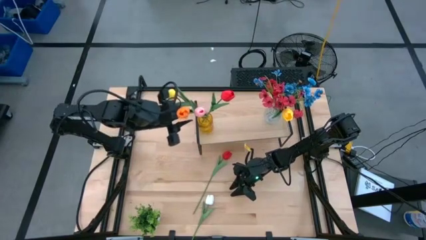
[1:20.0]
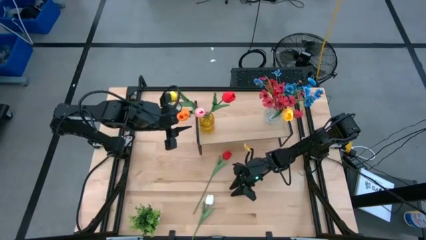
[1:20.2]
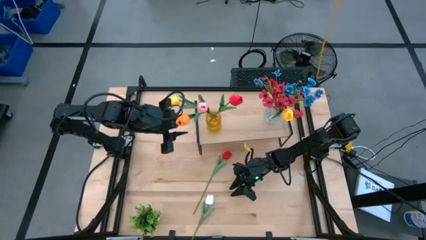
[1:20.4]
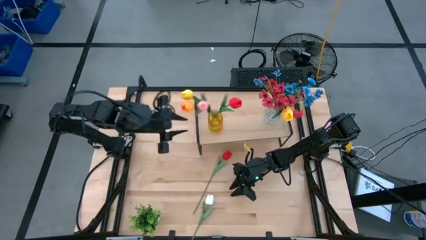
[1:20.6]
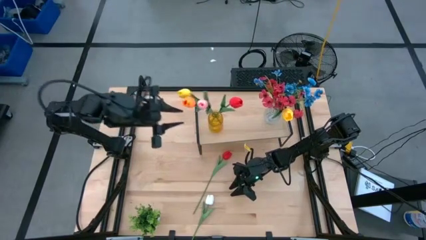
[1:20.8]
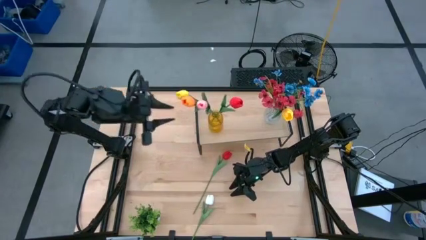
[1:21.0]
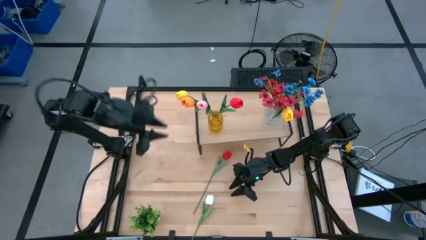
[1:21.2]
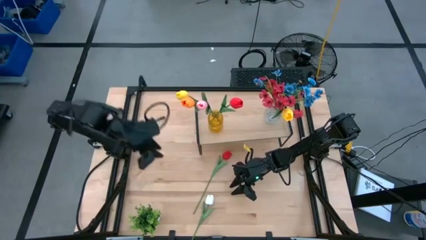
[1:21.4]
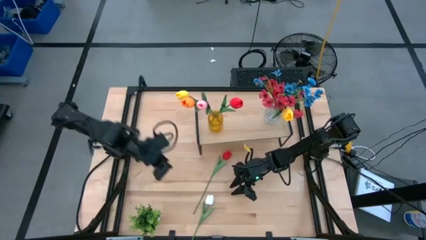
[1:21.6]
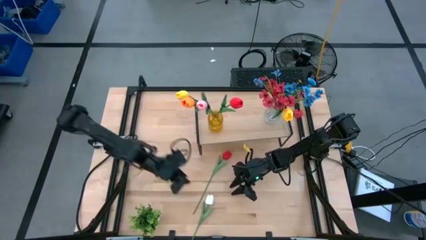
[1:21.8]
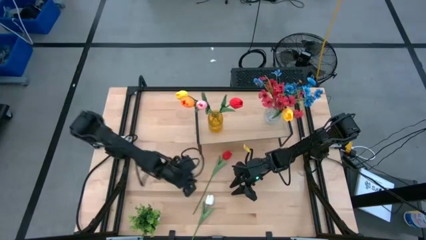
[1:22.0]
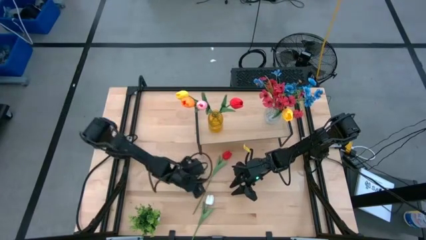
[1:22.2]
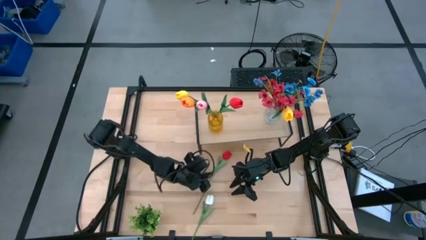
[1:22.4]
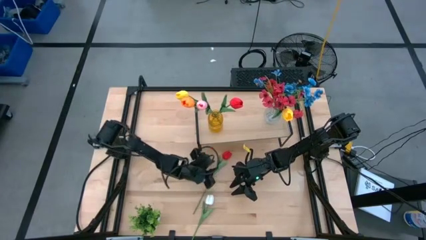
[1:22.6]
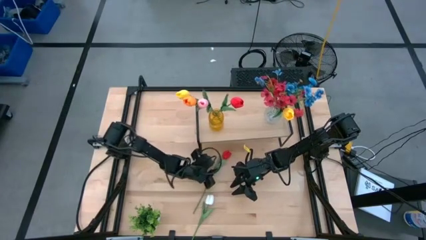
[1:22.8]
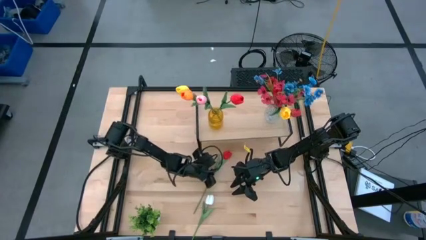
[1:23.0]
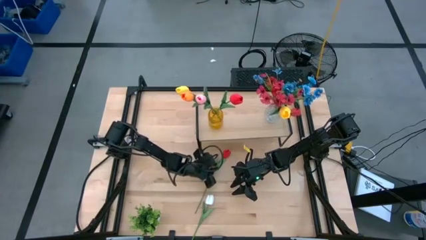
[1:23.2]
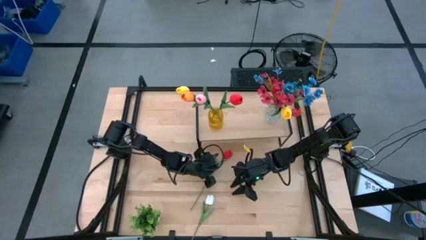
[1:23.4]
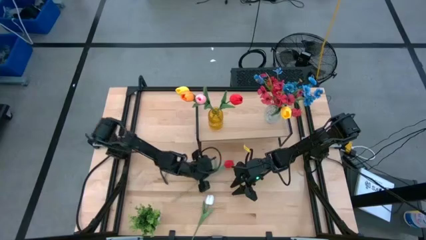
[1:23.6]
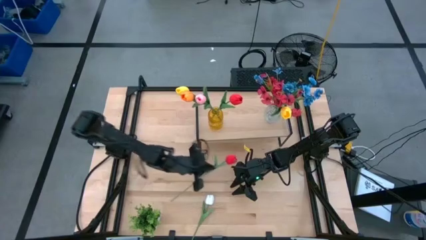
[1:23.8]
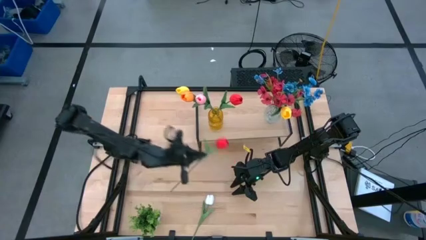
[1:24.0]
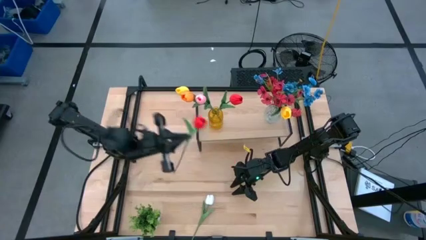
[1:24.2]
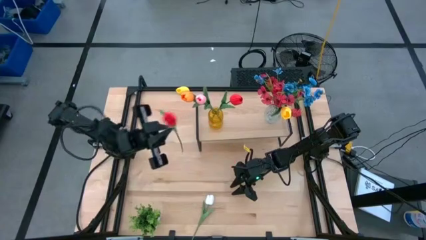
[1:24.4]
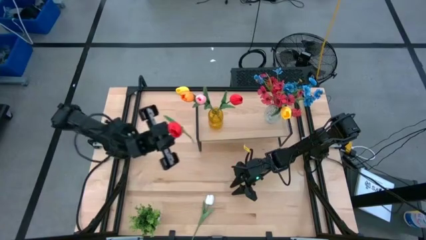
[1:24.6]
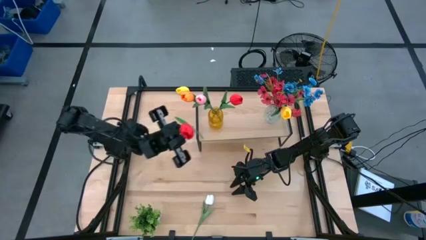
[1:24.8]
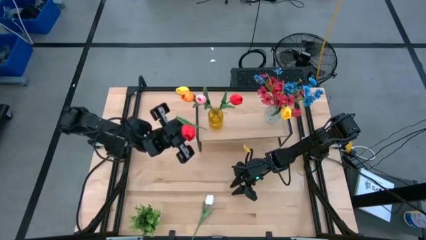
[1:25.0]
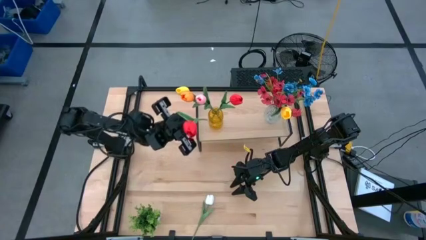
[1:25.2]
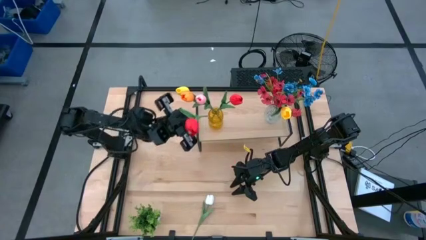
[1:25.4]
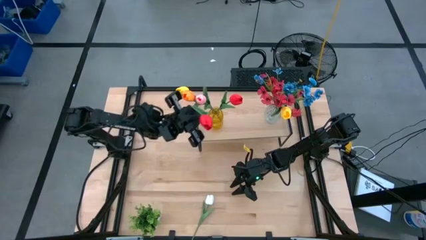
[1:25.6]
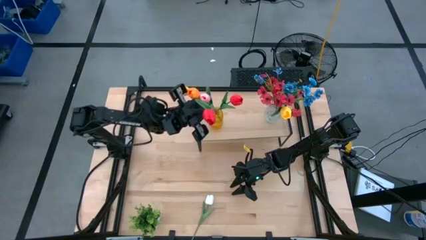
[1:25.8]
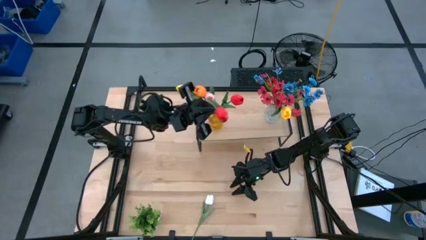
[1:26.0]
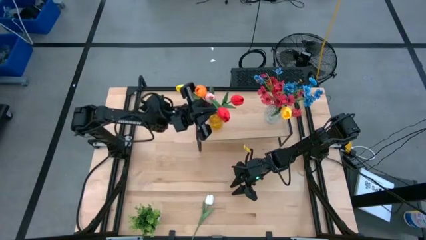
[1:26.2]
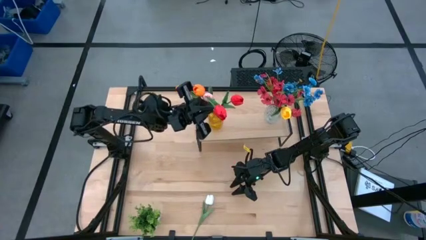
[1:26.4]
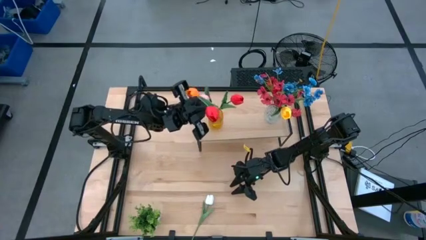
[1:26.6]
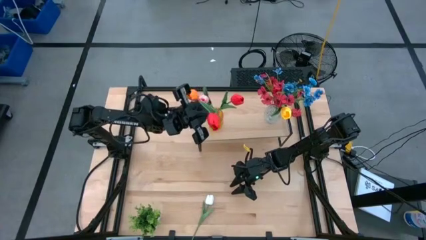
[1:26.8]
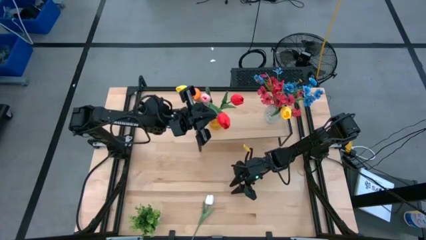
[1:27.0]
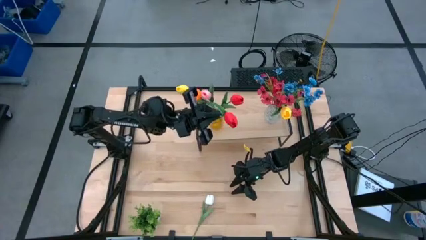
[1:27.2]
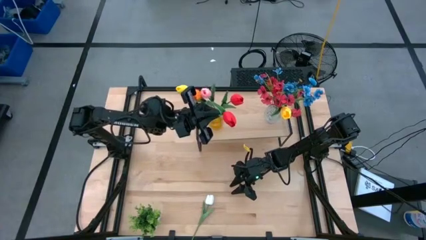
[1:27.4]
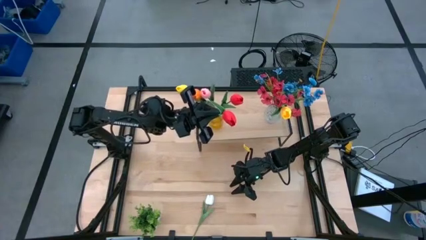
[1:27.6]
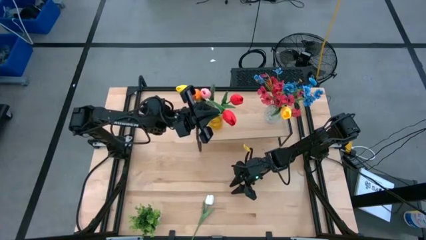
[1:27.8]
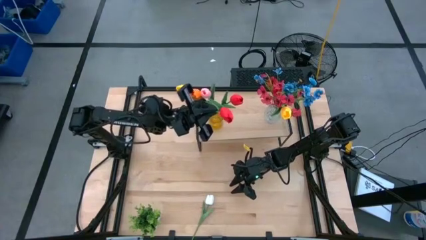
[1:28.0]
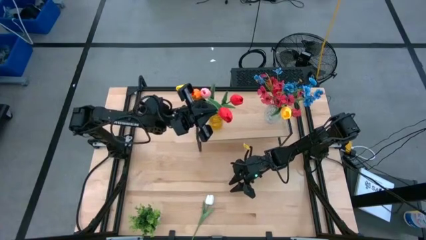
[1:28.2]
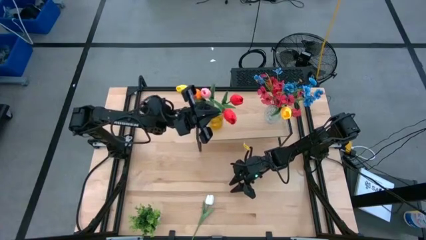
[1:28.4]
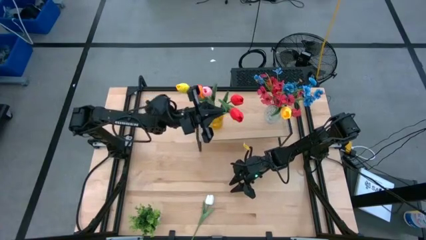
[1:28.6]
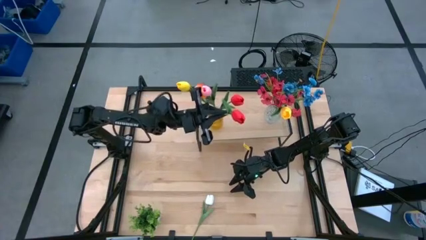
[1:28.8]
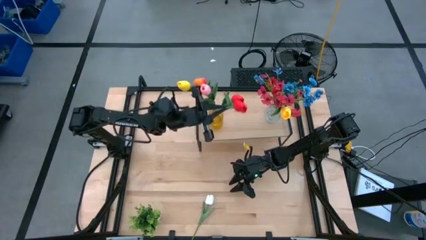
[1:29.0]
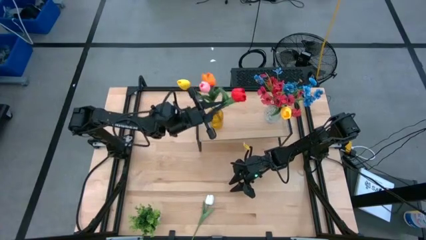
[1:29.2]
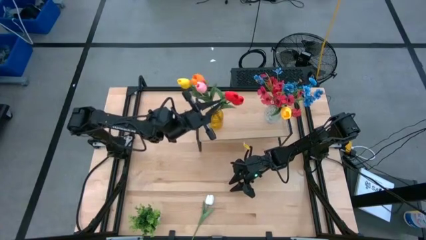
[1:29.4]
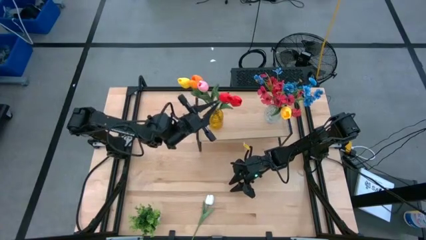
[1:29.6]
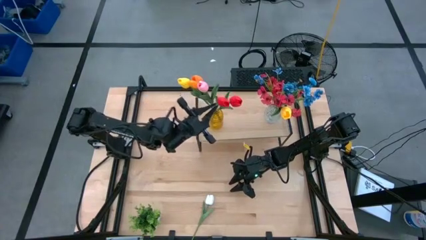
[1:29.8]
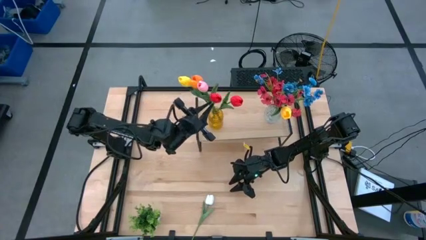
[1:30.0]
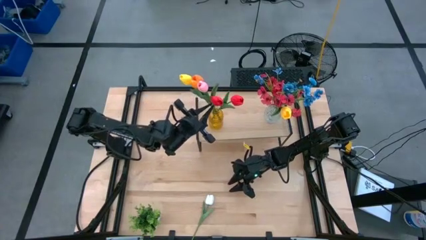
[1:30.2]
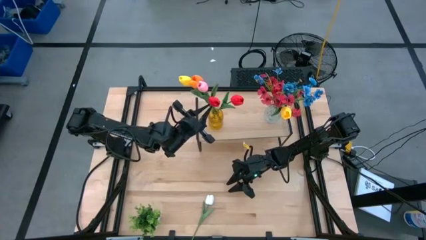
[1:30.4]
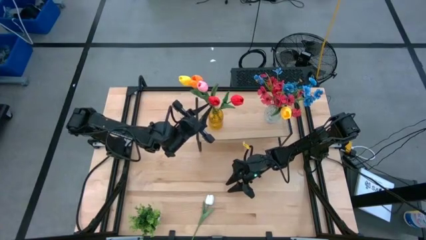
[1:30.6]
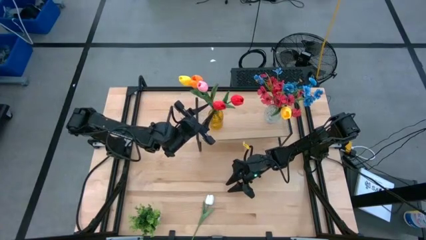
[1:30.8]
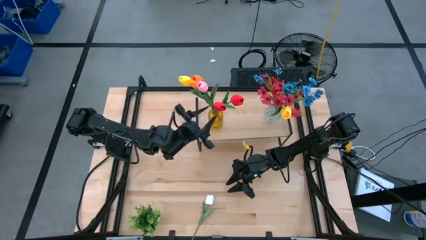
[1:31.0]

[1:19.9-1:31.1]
Task: Pick and place flowers into a vace then onto a shelf
Put the red flower into the yellow vase

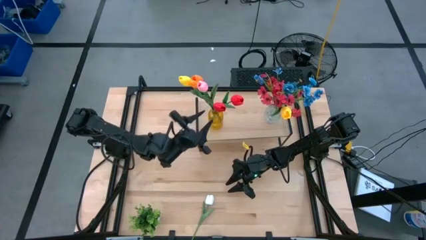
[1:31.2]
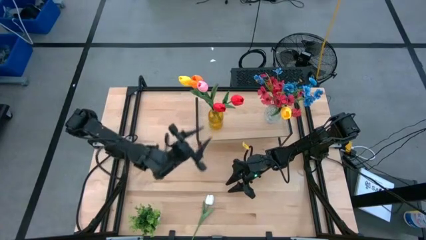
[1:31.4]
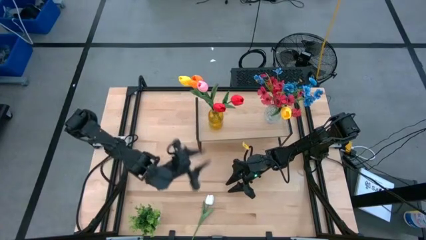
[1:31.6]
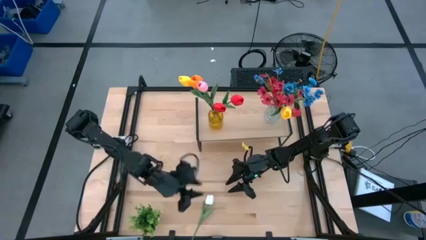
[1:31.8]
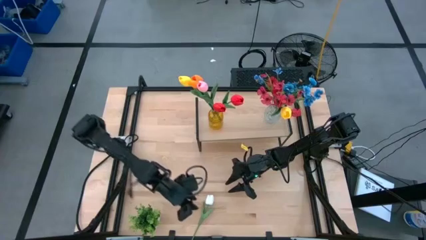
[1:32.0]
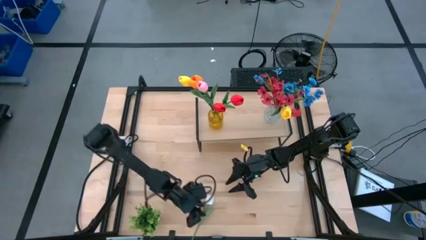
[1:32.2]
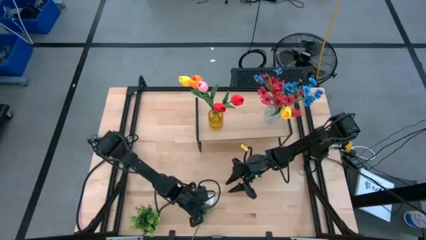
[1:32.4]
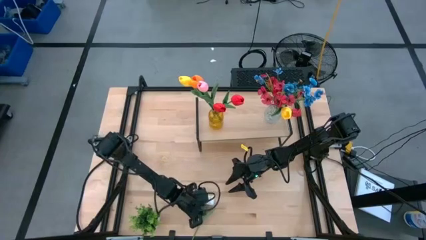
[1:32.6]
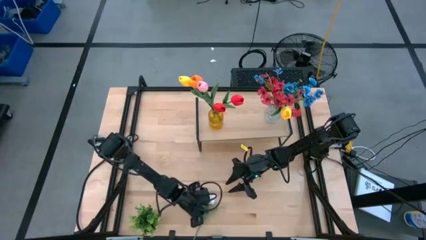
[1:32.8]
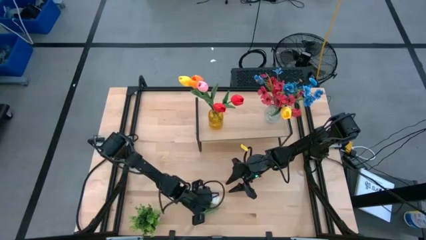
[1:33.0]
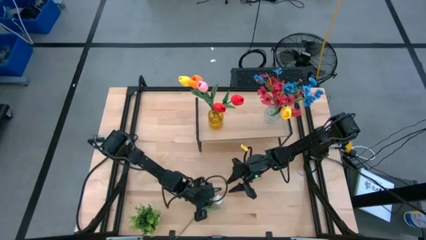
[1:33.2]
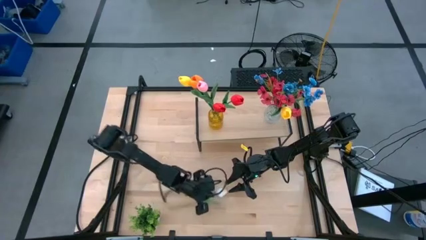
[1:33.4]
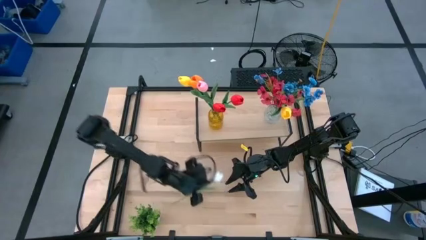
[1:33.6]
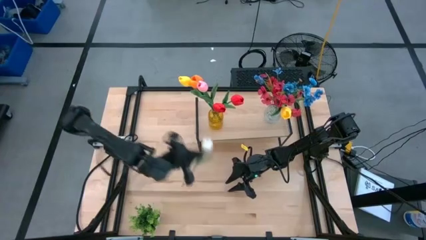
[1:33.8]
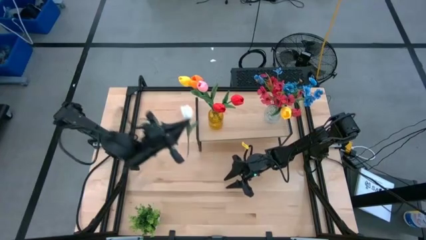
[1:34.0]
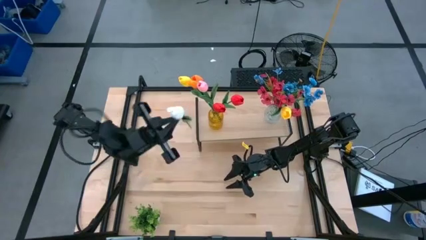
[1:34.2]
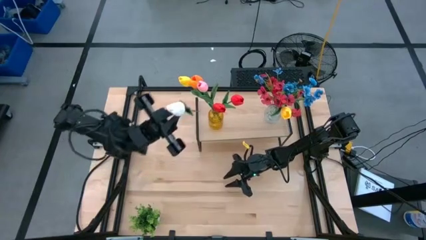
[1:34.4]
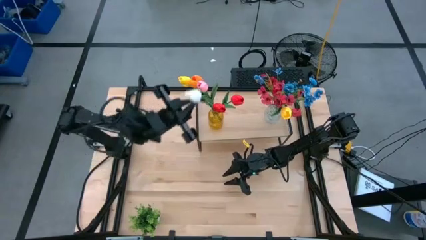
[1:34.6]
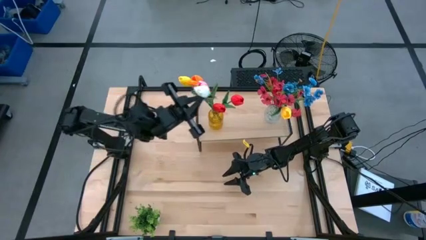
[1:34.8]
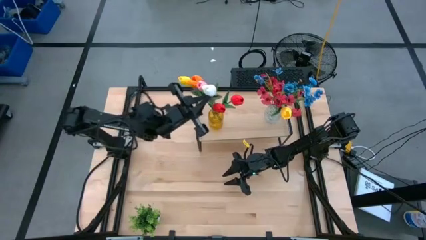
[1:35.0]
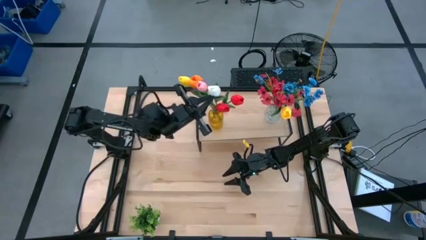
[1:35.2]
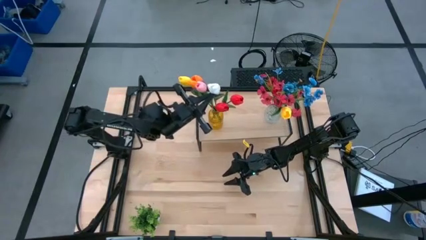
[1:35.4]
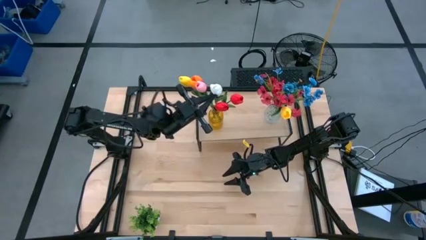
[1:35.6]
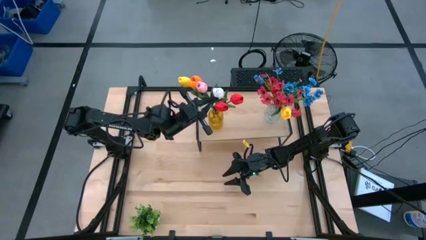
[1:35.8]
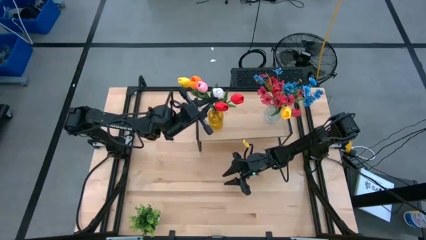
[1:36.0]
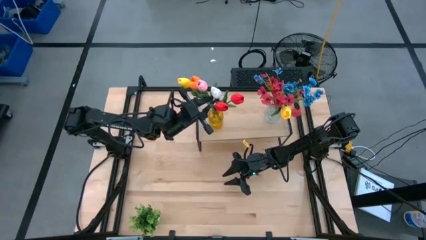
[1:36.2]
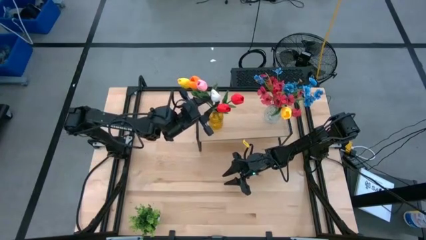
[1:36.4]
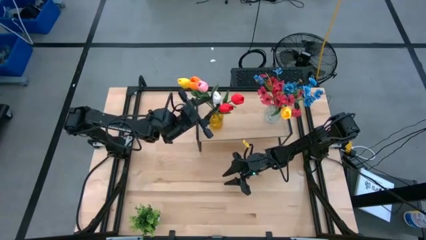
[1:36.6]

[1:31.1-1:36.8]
Put the white flower into the yellow vase
